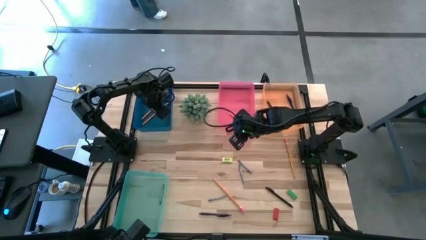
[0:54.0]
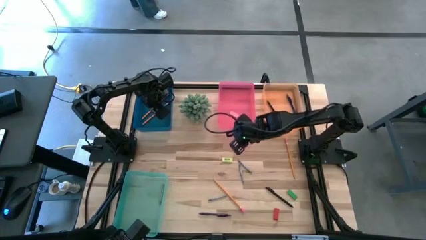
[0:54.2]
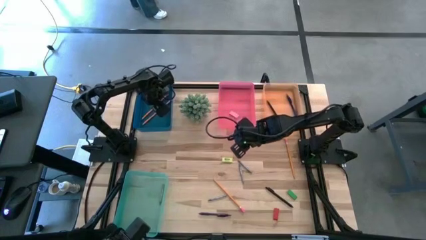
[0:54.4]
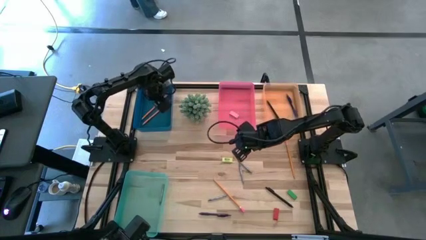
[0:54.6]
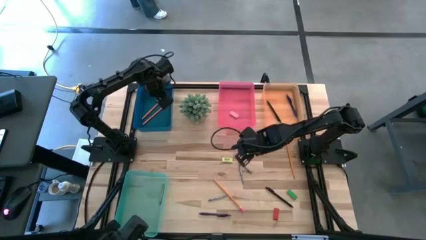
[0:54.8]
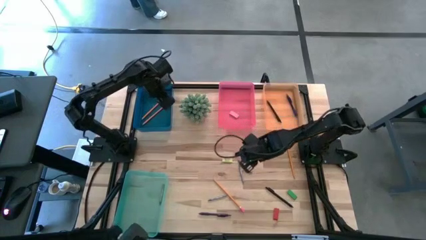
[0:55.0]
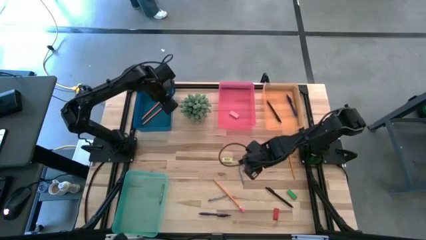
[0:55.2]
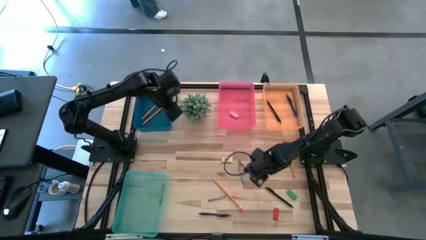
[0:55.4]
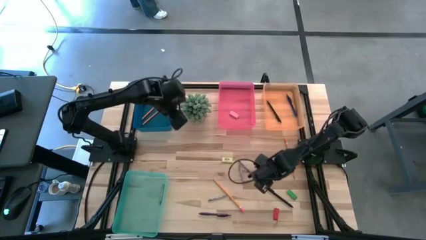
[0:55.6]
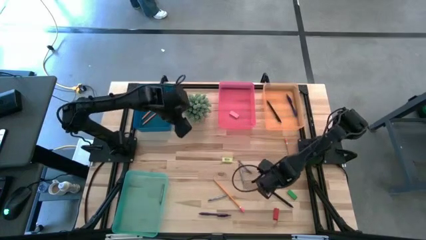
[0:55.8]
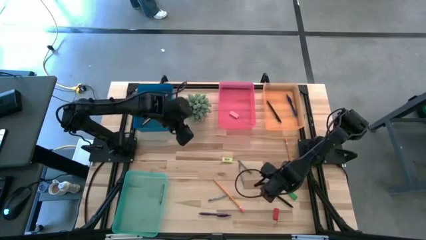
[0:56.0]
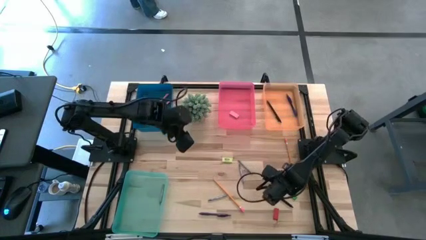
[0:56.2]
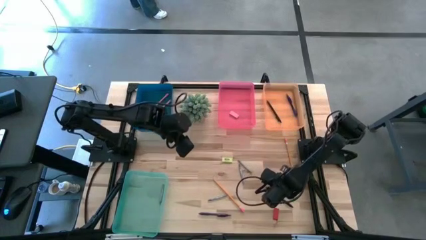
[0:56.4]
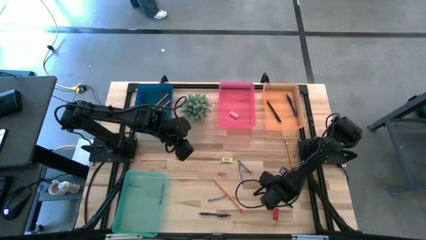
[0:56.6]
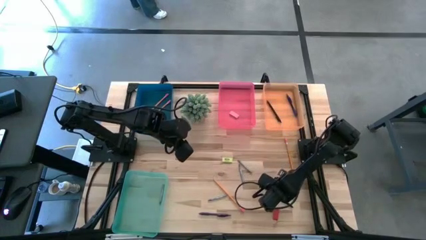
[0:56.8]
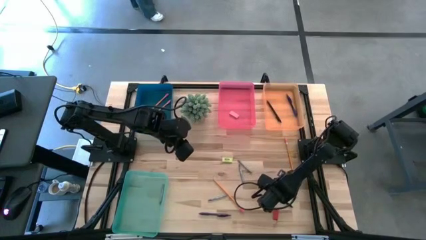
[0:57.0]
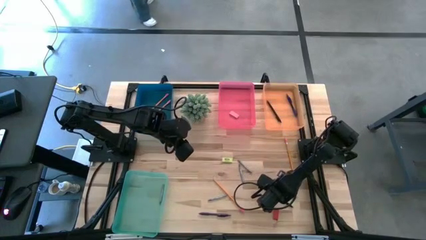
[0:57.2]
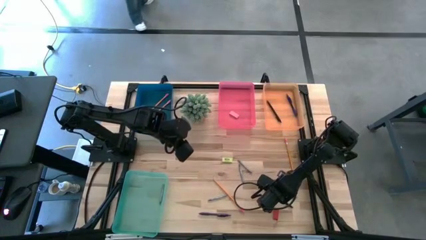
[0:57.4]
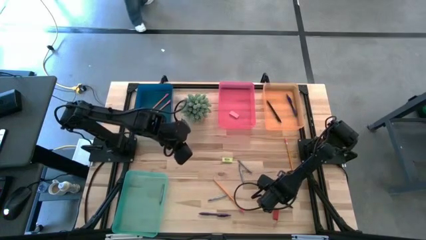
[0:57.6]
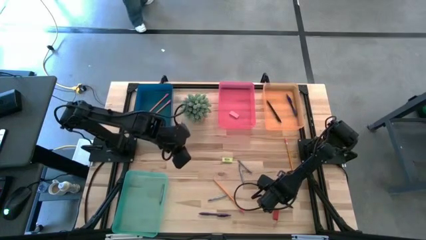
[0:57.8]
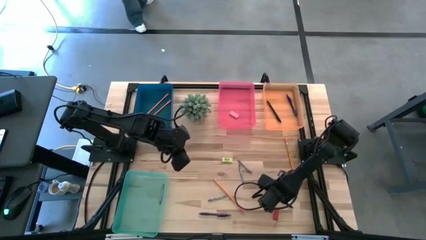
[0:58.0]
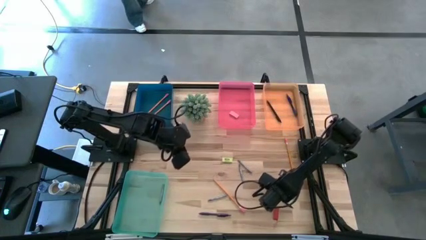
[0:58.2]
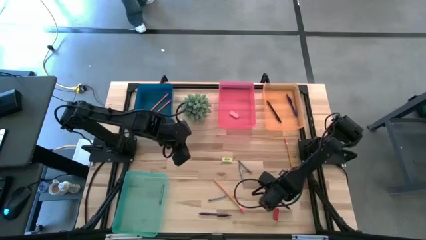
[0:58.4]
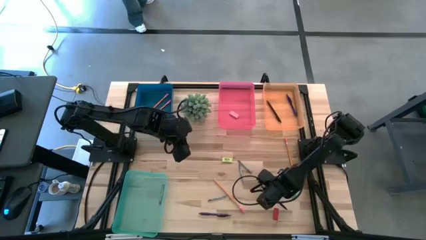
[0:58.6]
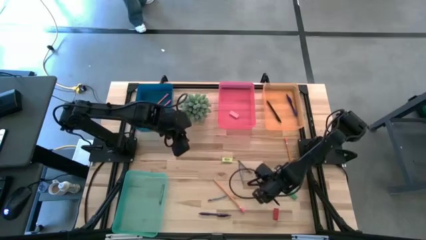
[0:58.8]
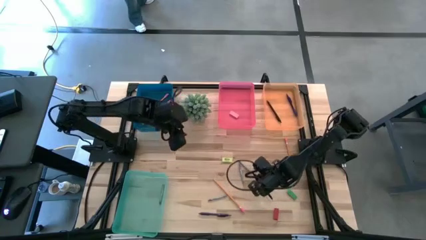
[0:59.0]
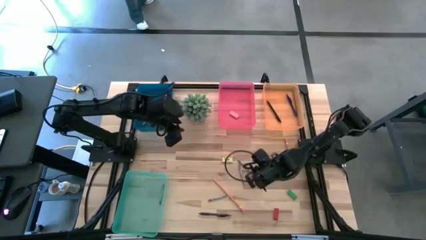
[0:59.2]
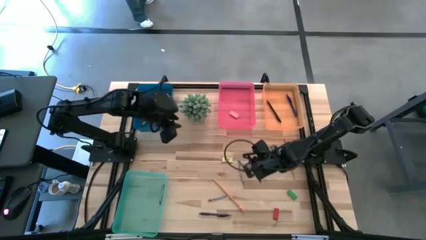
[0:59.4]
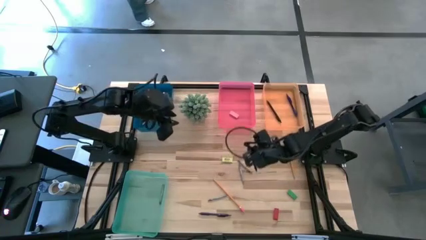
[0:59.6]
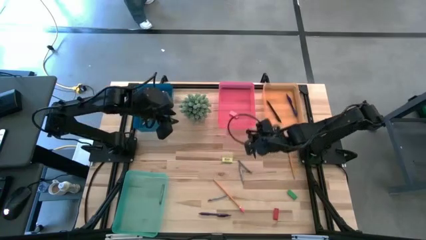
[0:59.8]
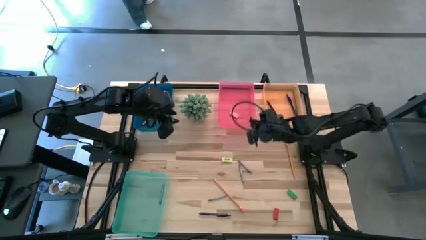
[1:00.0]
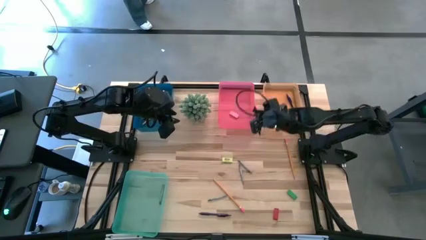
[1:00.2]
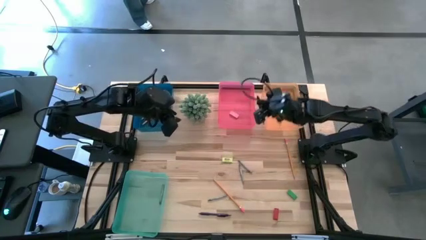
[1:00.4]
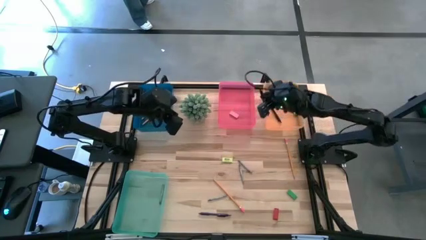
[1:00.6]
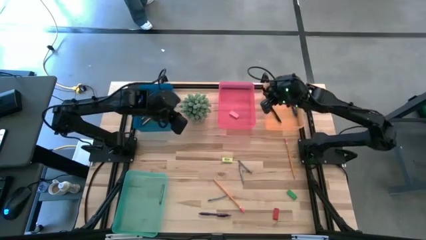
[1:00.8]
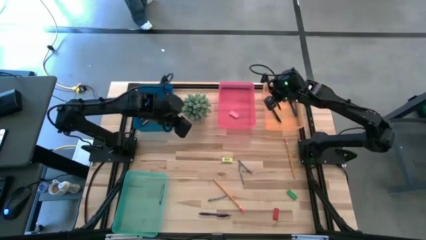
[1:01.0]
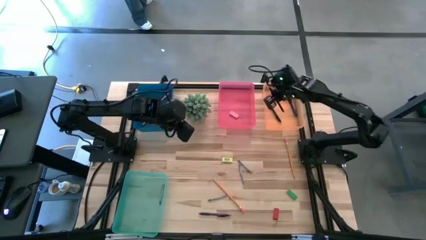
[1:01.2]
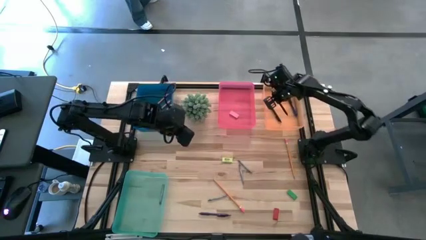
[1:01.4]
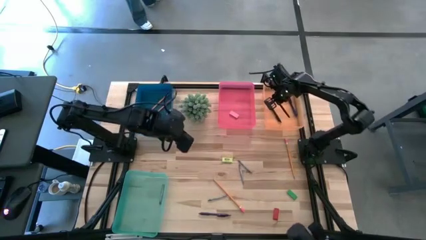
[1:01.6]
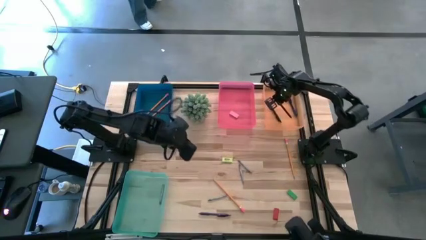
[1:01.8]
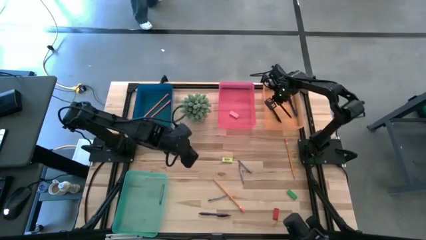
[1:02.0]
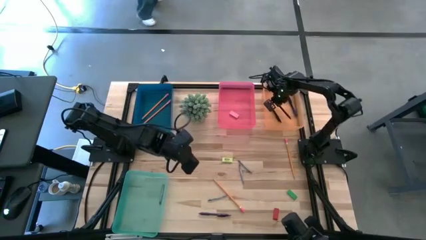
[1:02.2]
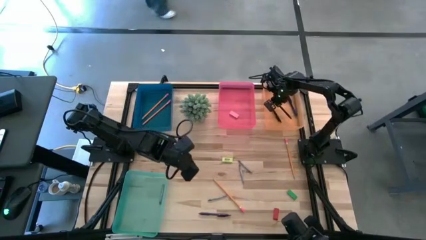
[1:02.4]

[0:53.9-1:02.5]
Task: Sort crayons/erasers/pens/pencils in bins
Put the black pen into the orange bin

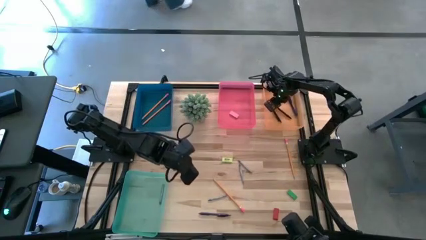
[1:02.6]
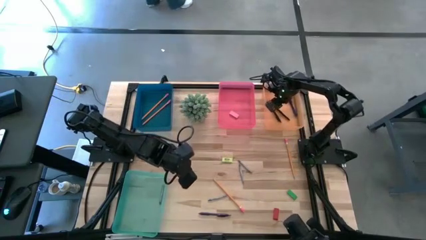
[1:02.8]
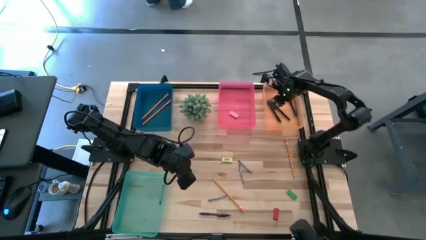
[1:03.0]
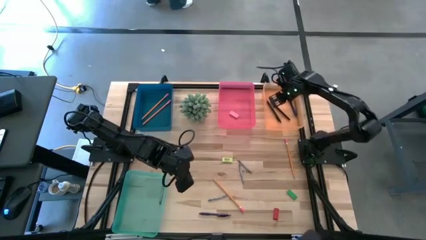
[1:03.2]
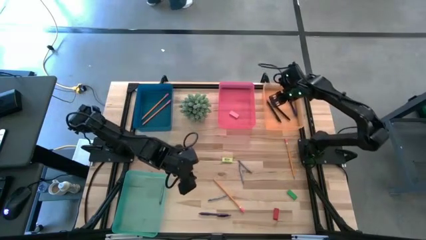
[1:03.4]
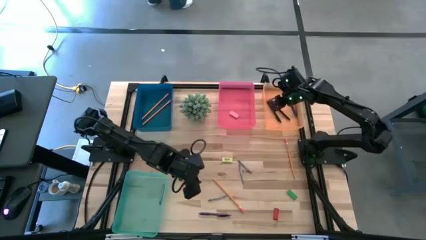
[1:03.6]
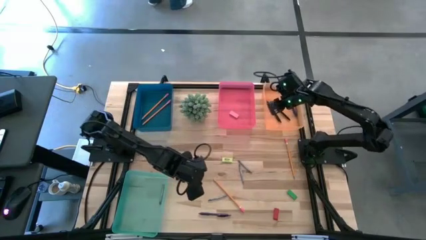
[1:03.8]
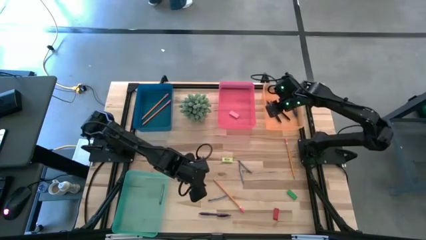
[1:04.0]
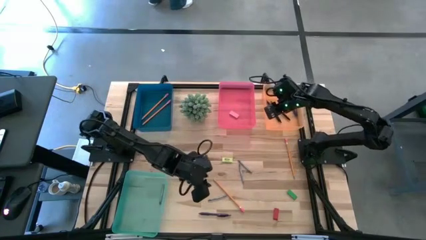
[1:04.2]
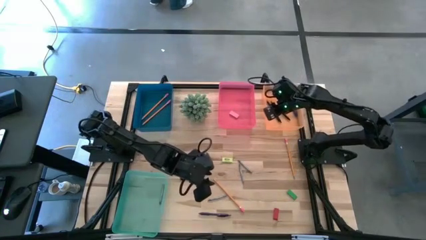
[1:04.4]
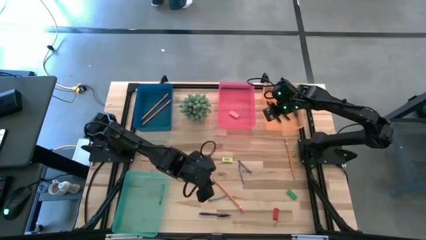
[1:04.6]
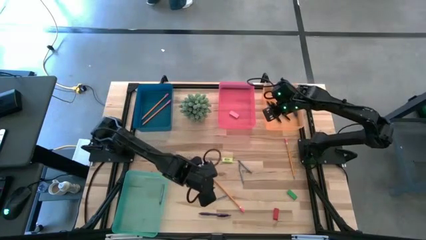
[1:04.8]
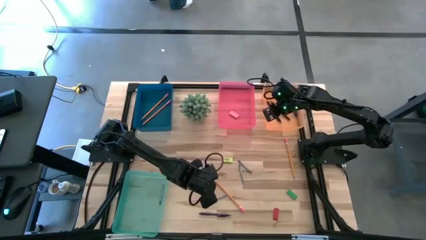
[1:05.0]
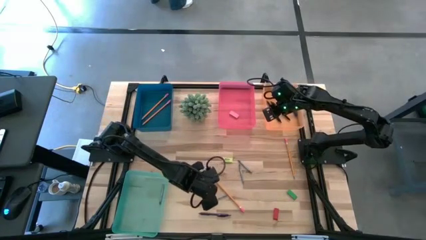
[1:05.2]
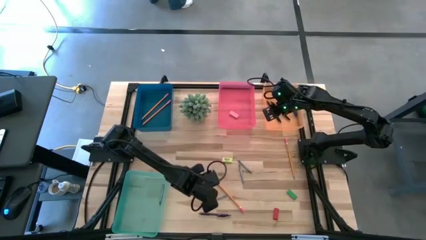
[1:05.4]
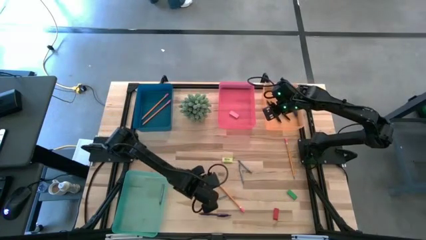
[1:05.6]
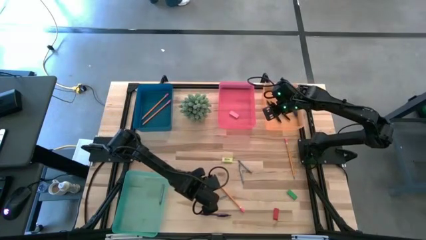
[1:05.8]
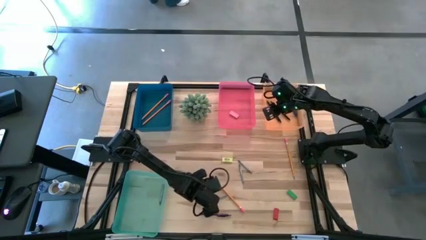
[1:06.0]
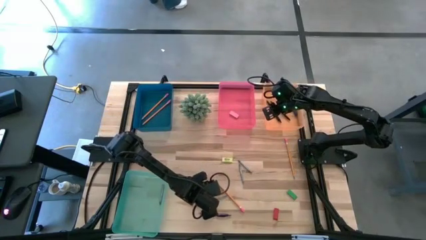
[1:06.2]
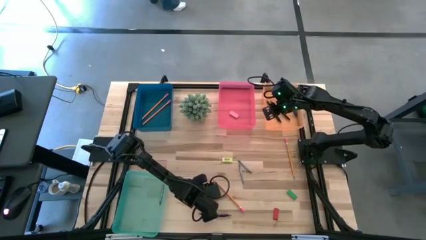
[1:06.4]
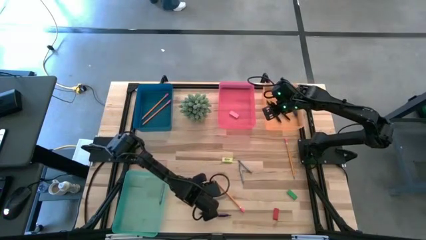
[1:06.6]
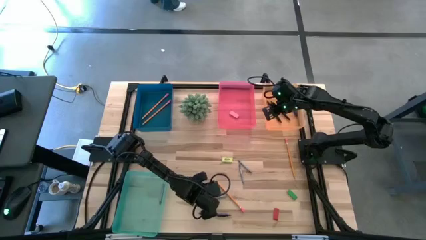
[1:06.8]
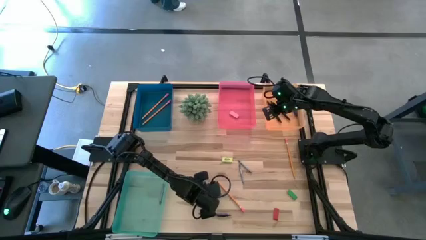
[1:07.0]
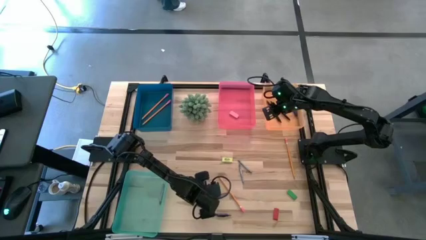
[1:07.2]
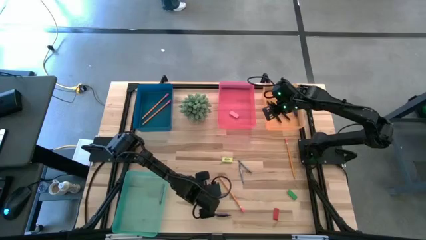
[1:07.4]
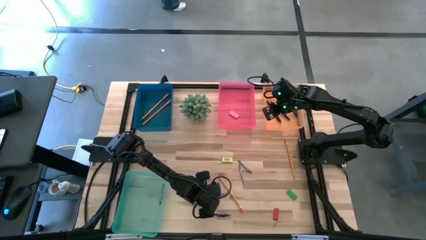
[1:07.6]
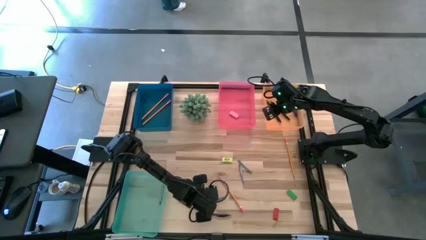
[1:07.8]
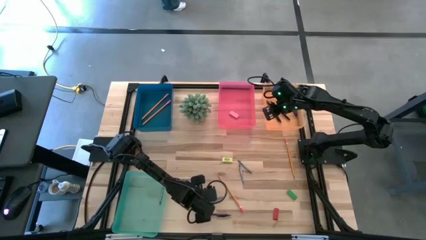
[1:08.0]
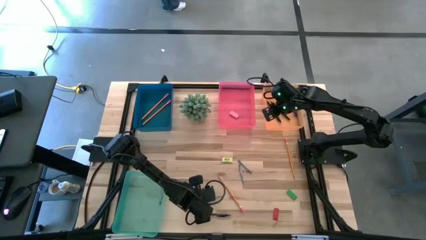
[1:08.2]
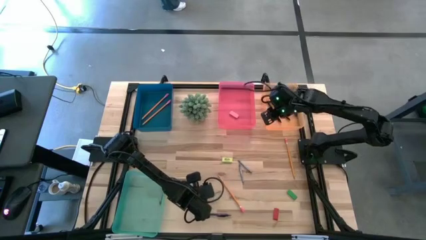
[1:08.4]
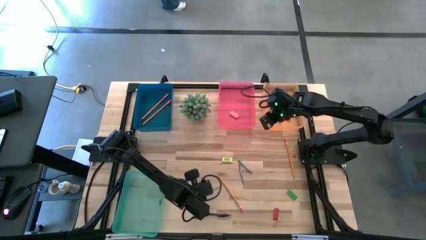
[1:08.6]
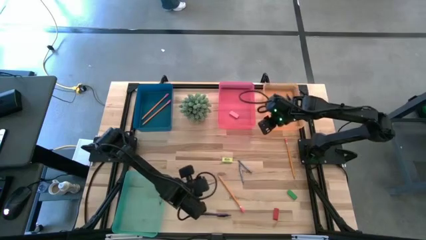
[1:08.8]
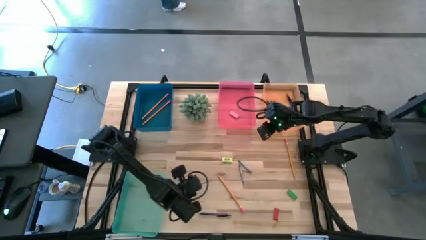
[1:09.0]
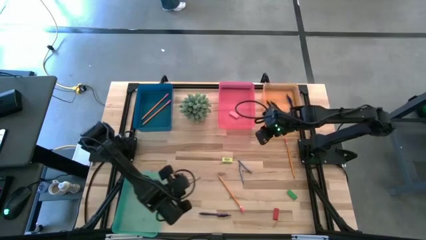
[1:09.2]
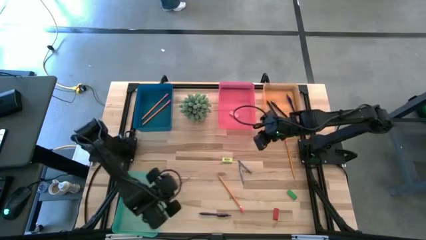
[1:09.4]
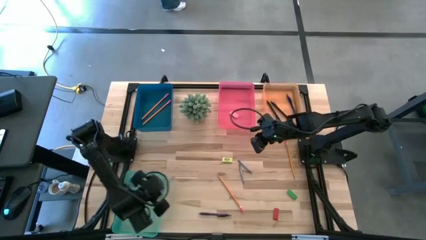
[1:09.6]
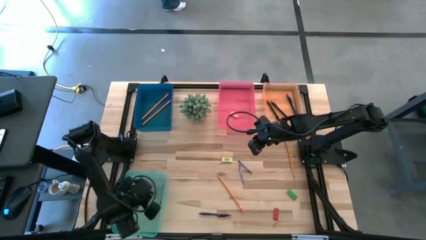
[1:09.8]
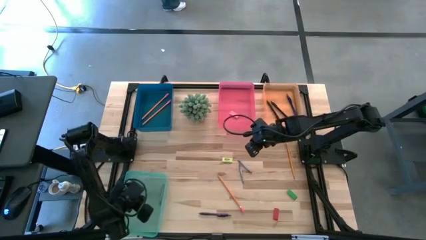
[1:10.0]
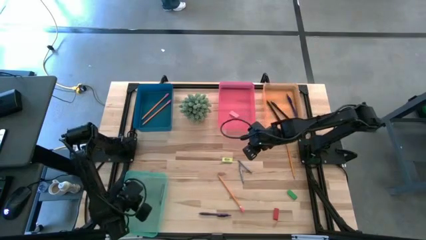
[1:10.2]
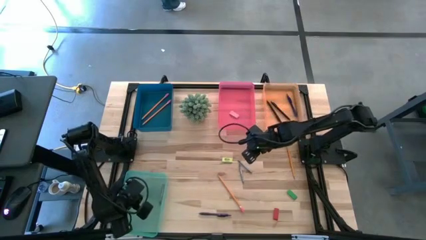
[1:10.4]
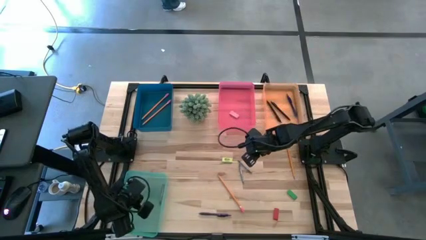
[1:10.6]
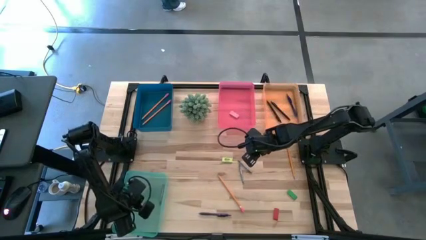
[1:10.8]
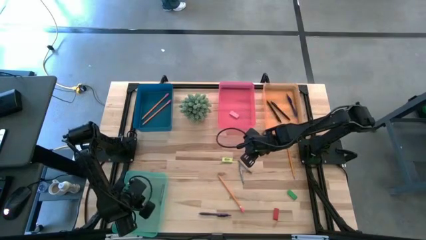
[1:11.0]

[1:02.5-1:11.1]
Put the gray crayon into the green bin
